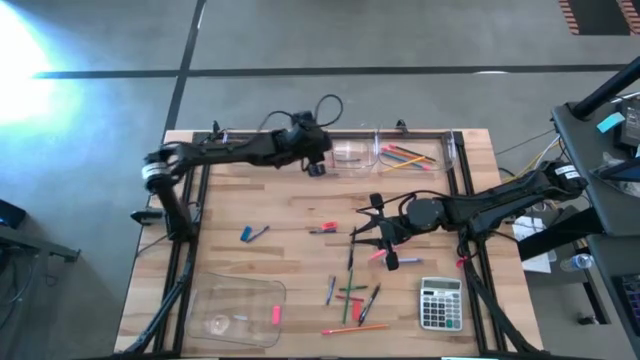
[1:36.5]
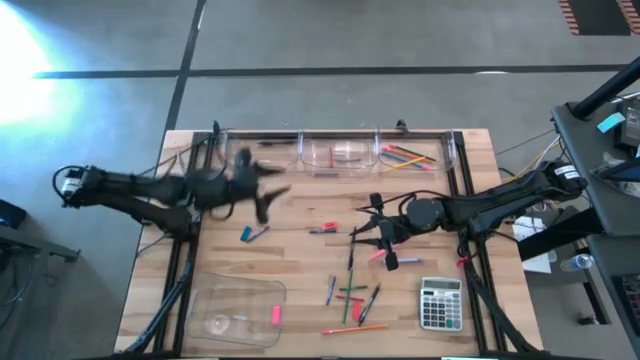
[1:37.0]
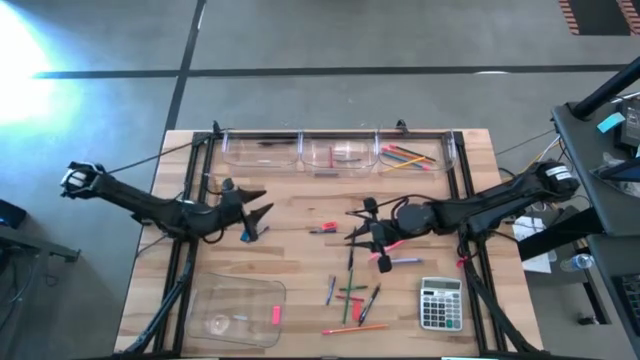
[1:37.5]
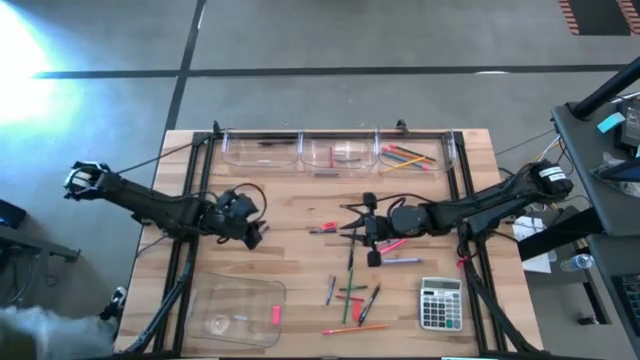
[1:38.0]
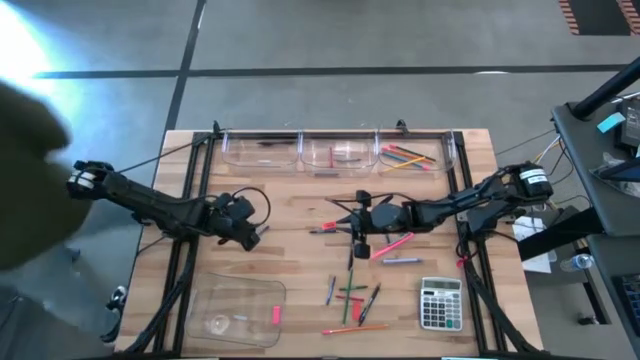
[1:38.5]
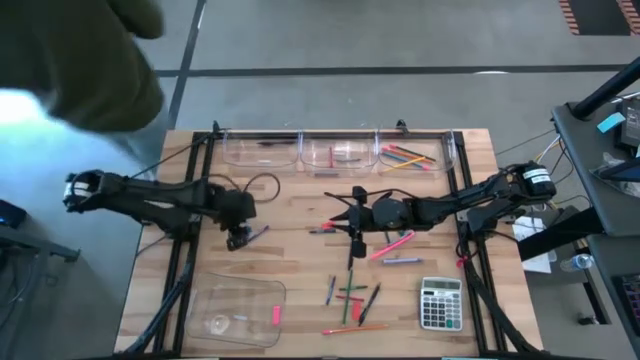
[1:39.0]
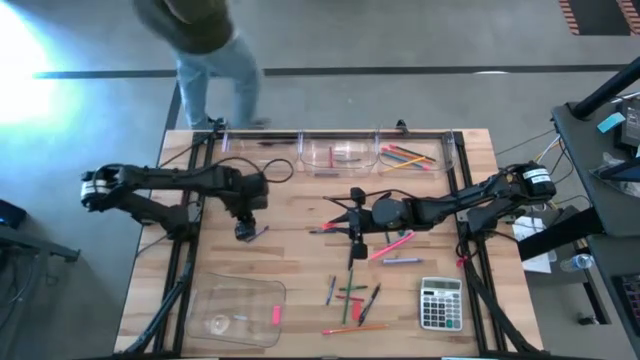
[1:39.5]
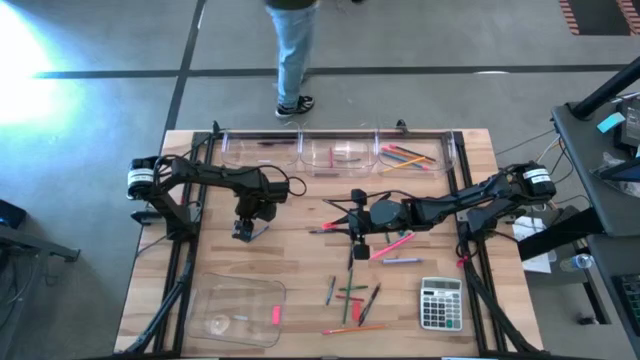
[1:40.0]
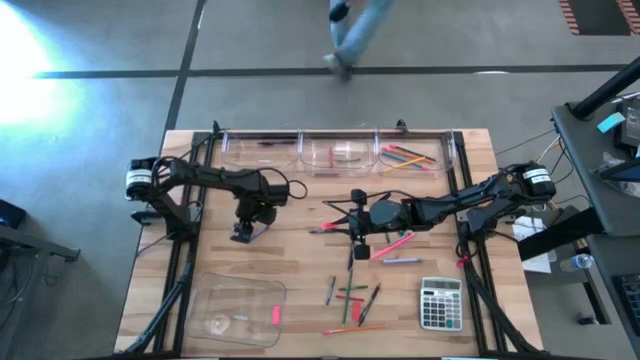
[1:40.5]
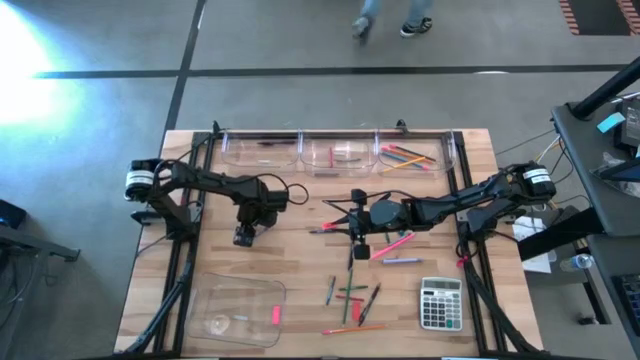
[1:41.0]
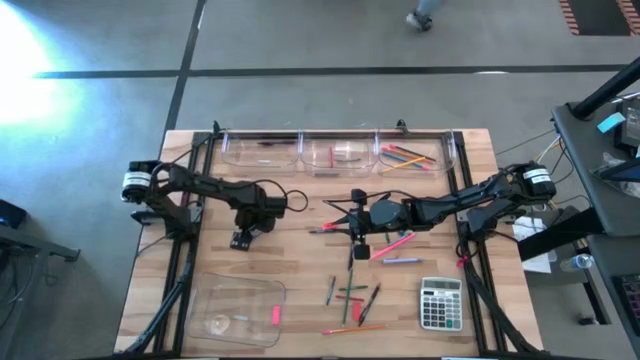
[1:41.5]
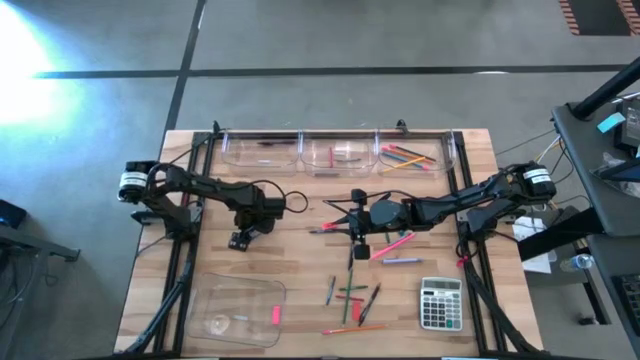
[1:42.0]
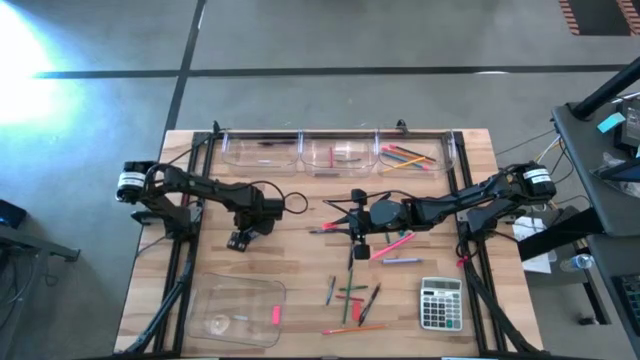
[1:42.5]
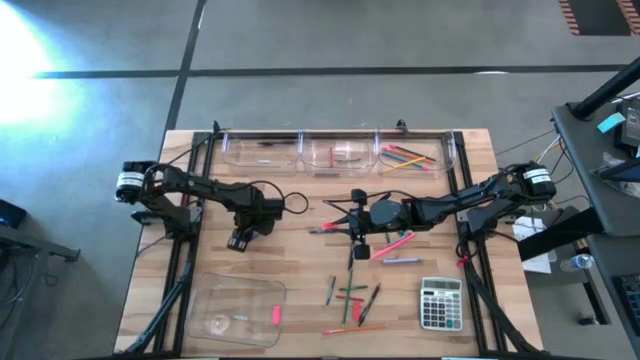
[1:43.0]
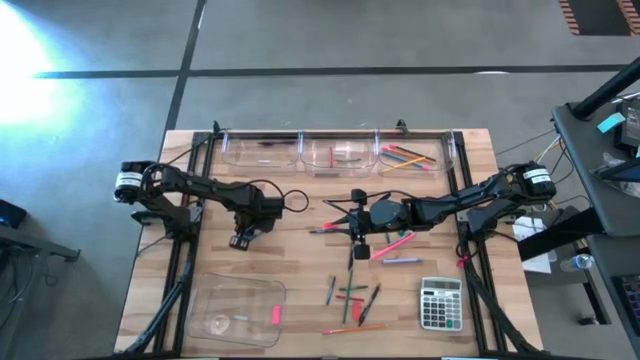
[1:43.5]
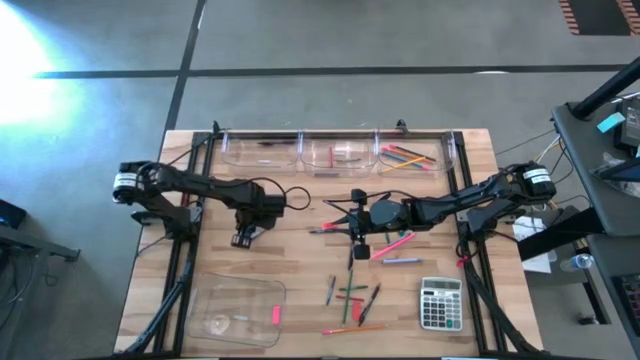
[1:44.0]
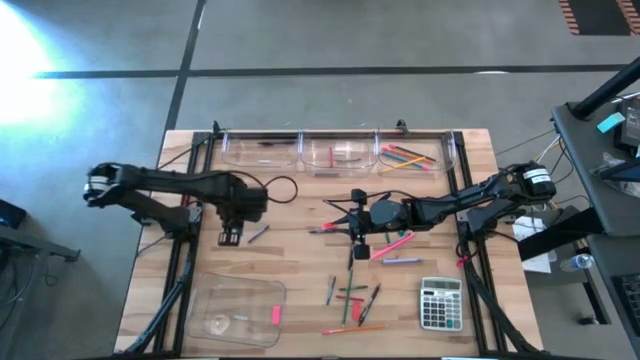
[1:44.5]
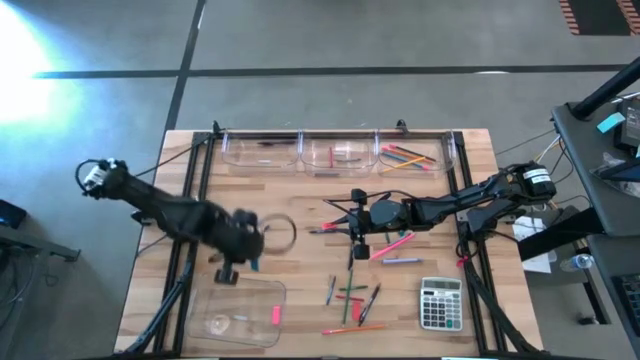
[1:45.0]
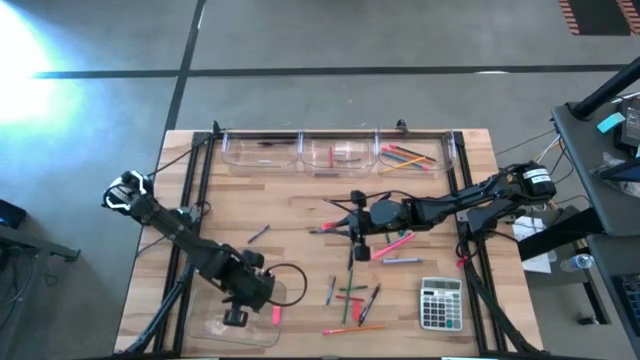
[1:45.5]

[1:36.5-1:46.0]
Task: Sort crayons/erasers/pens/pencils in bins
Put the blue eraser into the bottom transparent bin

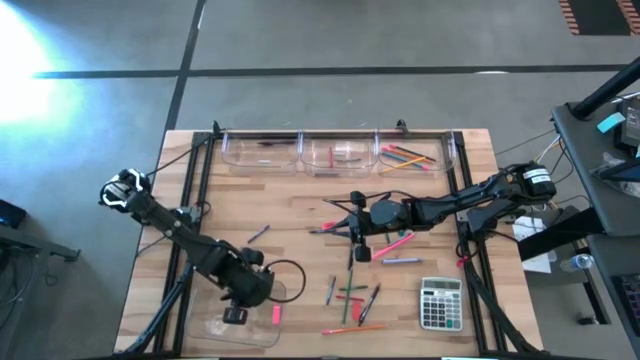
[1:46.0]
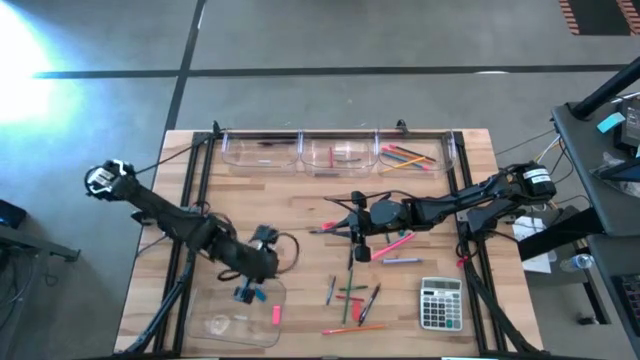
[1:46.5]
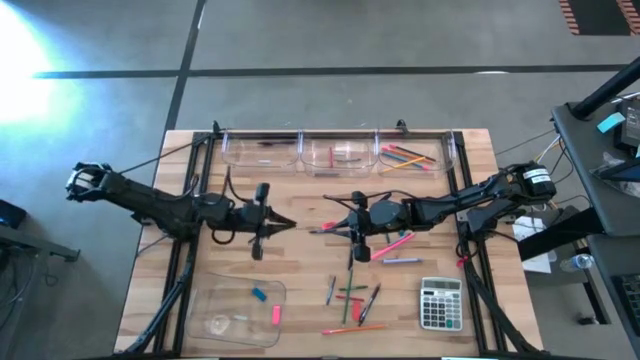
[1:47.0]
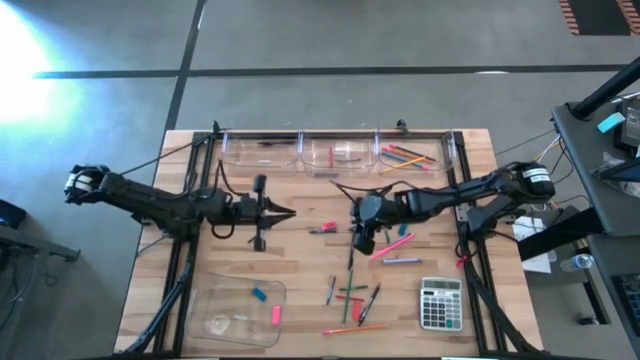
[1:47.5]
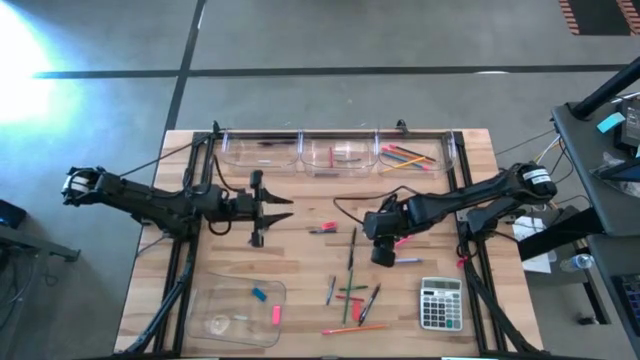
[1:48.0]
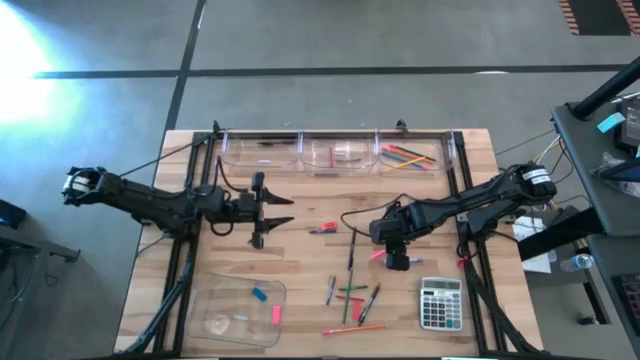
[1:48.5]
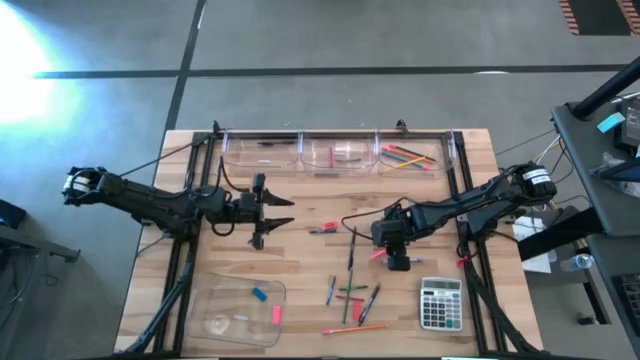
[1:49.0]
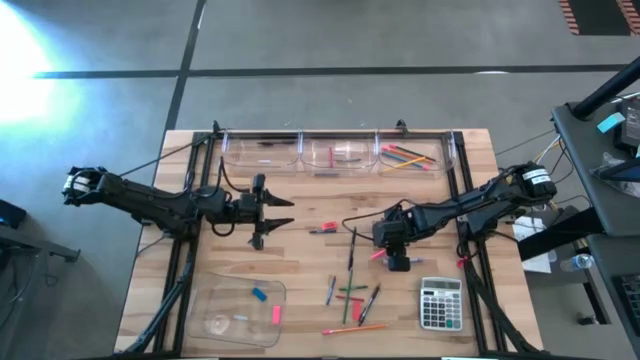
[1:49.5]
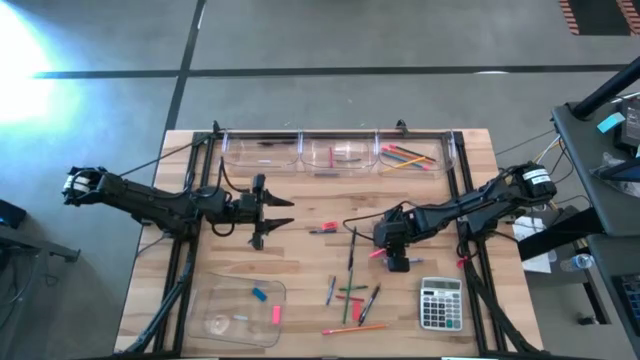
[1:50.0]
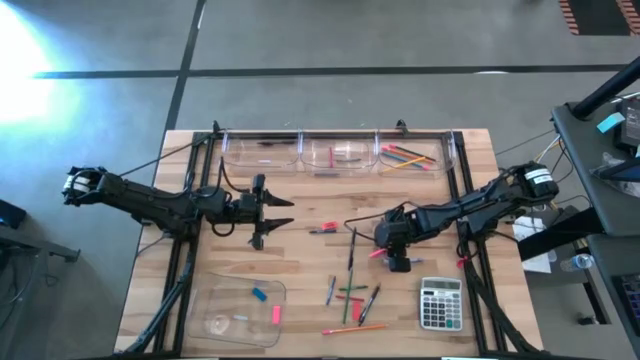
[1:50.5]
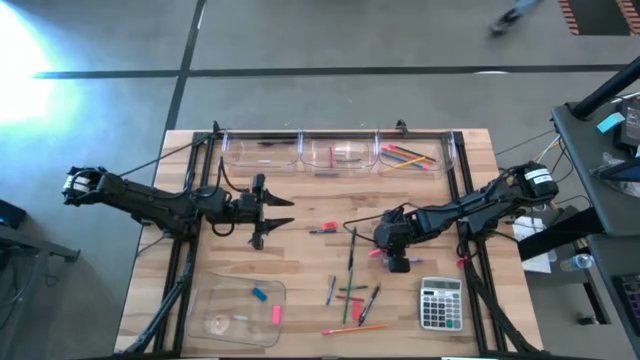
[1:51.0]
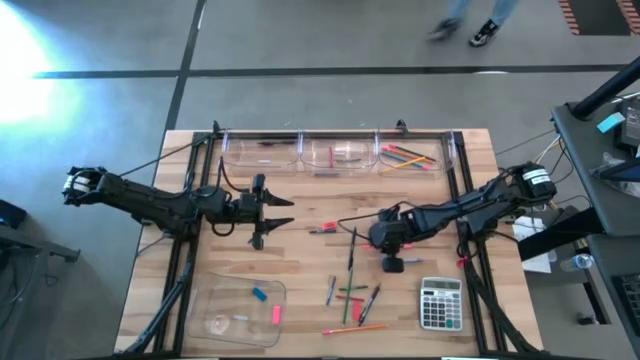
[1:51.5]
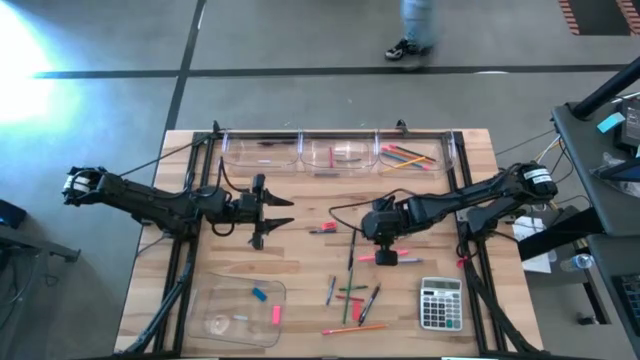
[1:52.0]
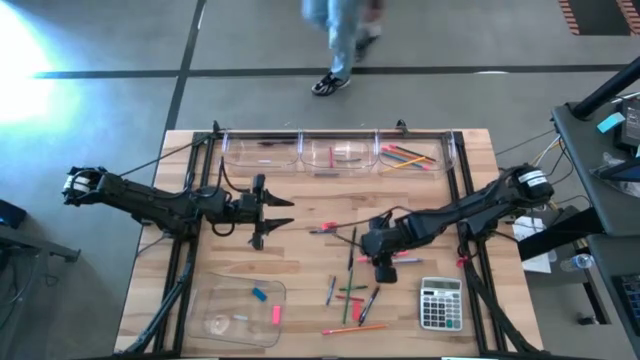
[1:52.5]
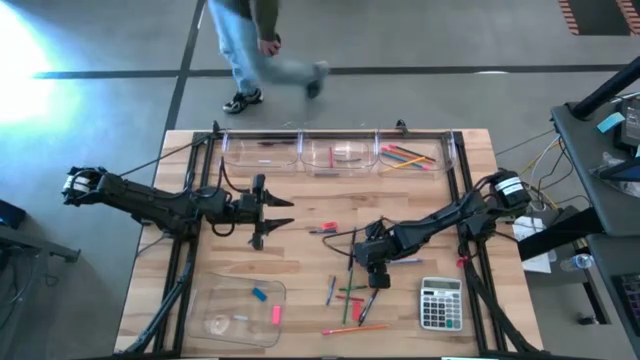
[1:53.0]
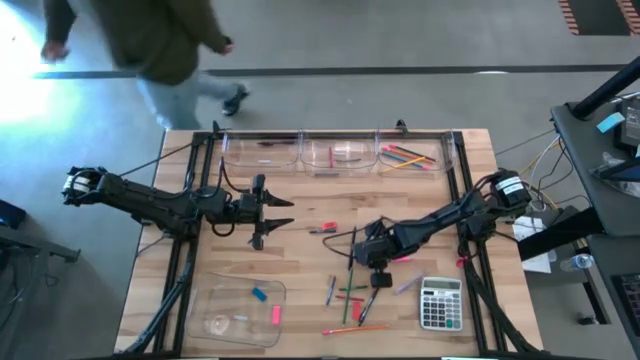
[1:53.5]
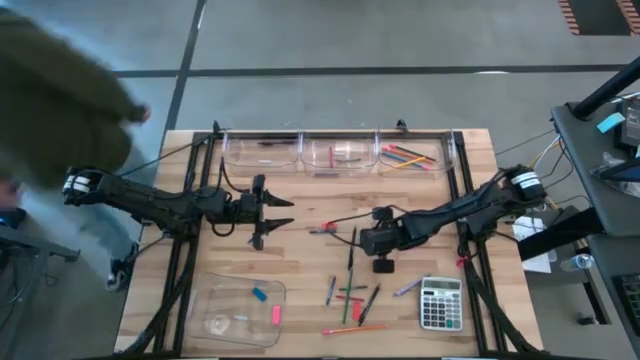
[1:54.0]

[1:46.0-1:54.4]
Put the pink pencil into the top right transparent bin

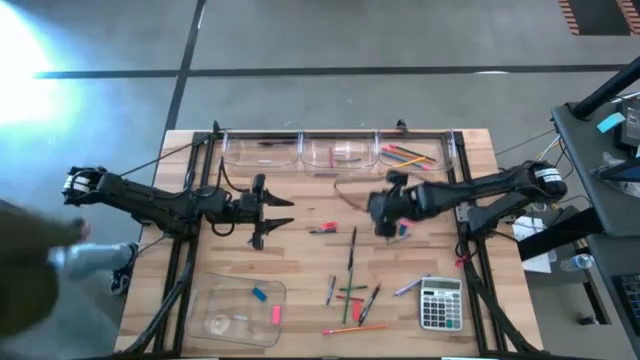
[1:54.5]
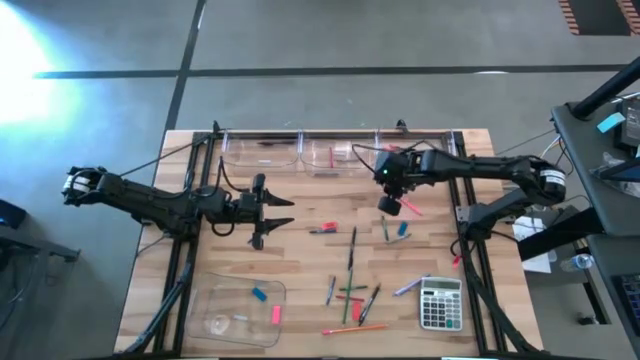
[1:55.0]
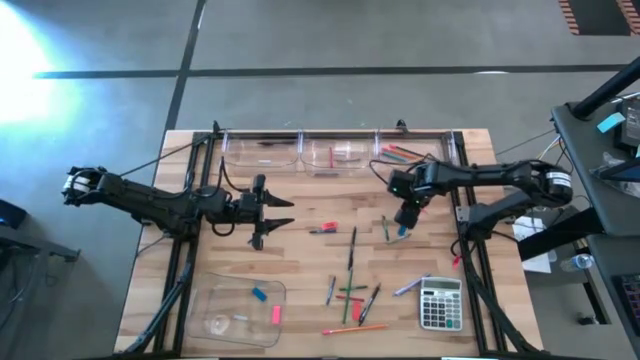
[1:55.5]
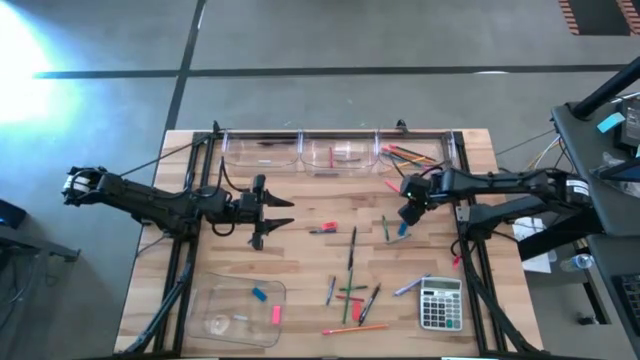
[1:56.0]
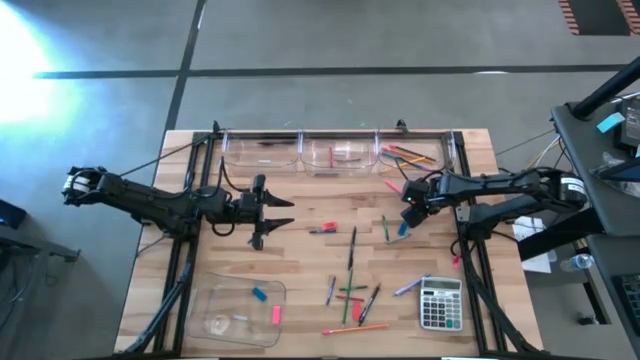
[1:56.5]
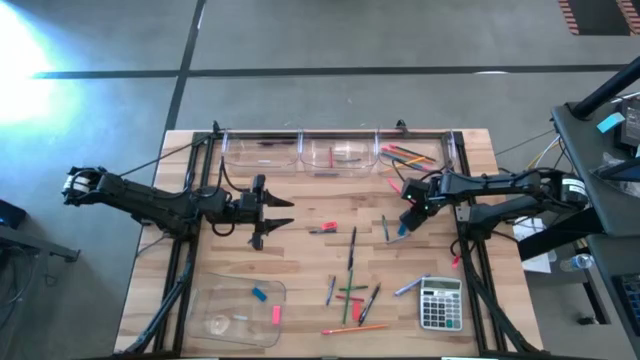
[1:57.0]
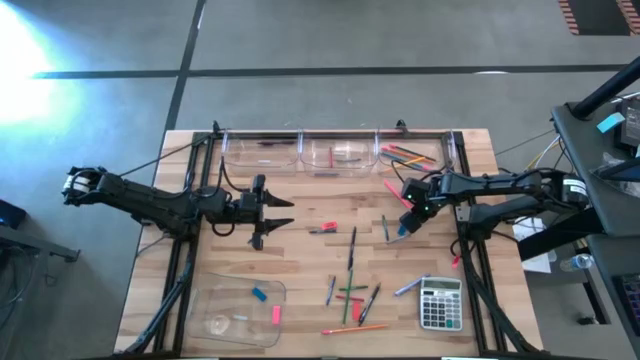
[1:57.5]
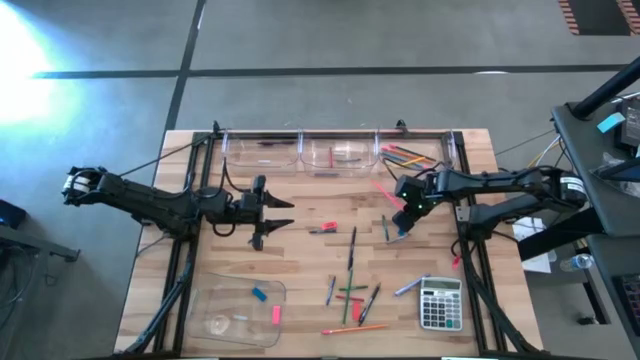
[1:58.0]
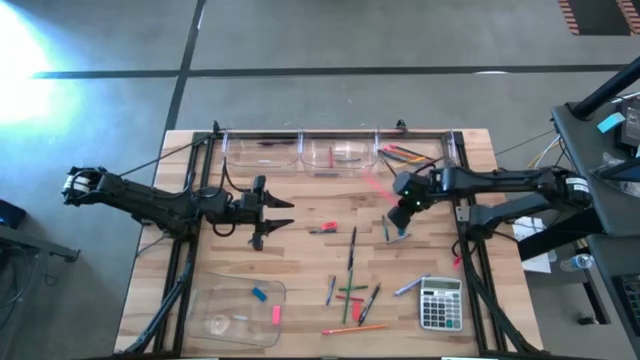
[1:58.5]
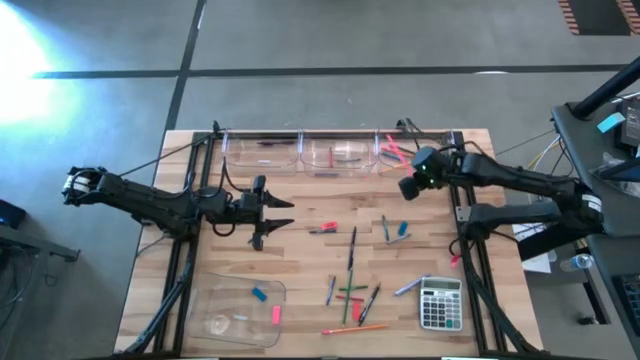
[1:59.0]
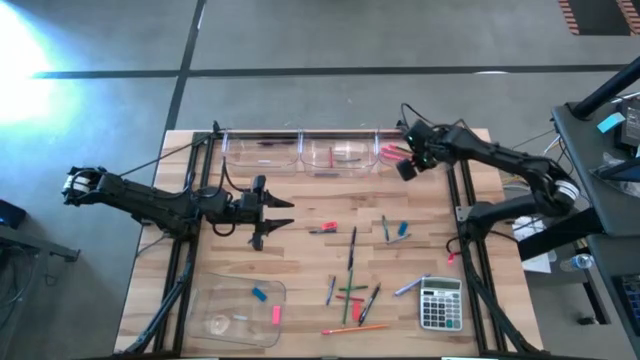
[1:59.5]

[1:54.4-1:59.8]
Put the pink pencil into the top right transparent bin
